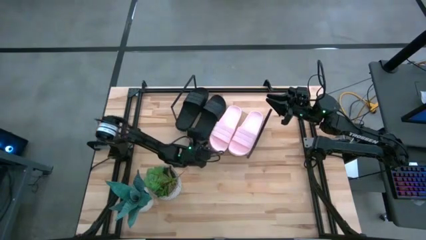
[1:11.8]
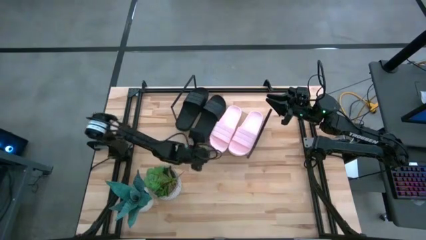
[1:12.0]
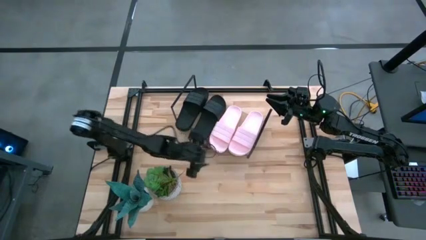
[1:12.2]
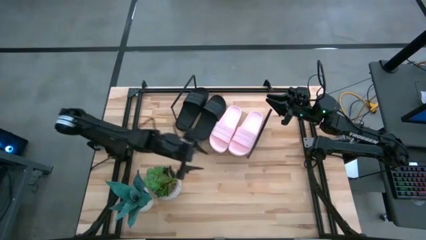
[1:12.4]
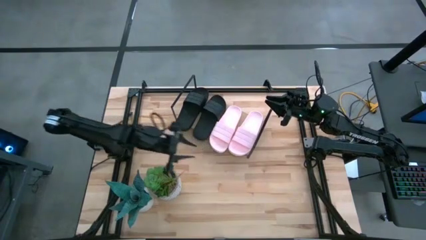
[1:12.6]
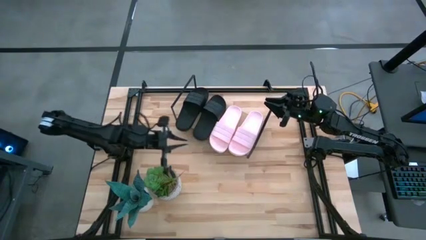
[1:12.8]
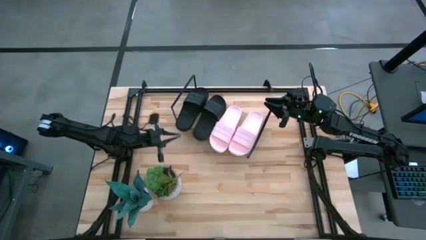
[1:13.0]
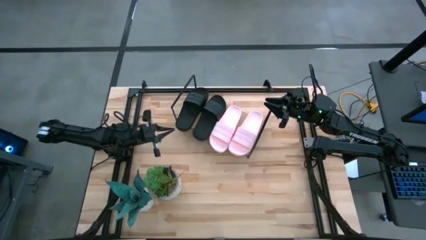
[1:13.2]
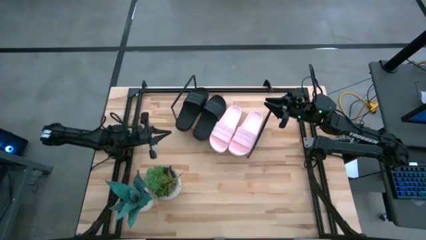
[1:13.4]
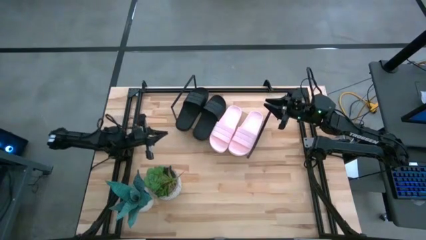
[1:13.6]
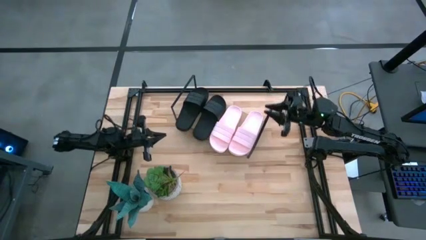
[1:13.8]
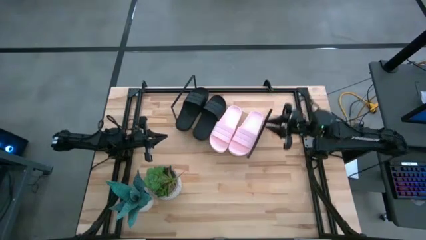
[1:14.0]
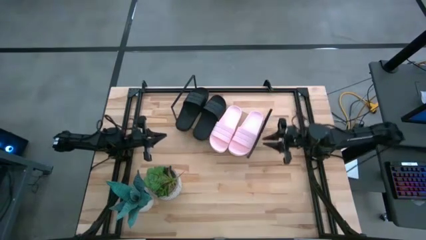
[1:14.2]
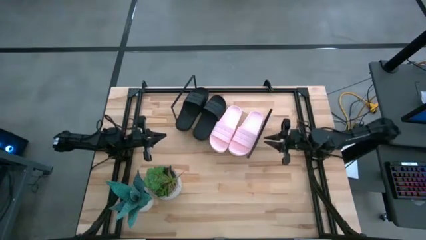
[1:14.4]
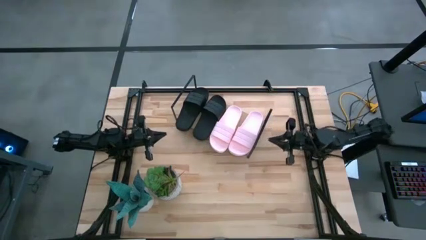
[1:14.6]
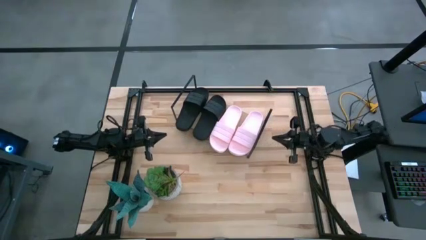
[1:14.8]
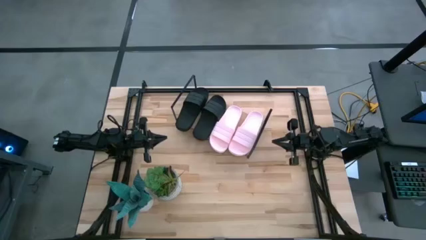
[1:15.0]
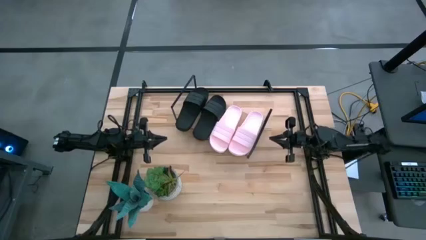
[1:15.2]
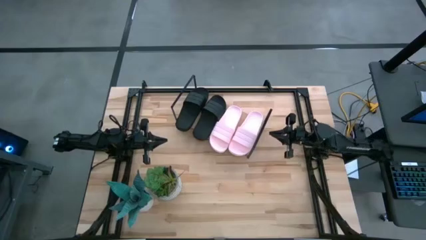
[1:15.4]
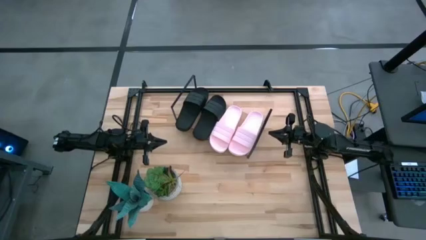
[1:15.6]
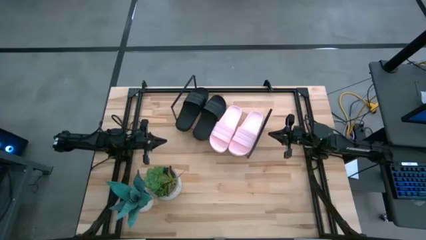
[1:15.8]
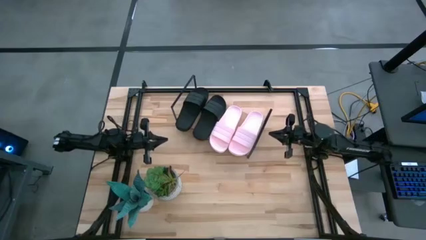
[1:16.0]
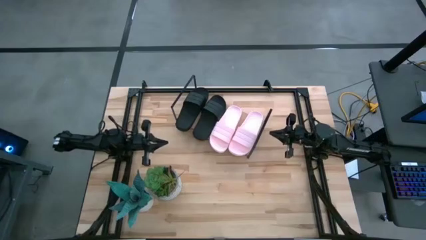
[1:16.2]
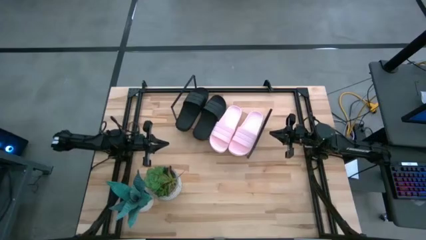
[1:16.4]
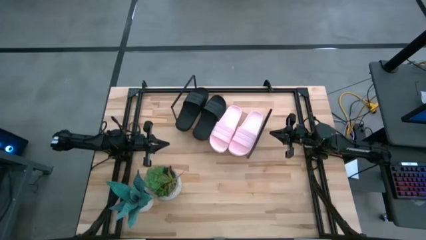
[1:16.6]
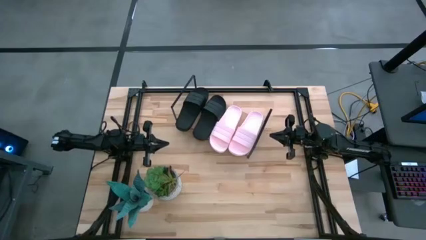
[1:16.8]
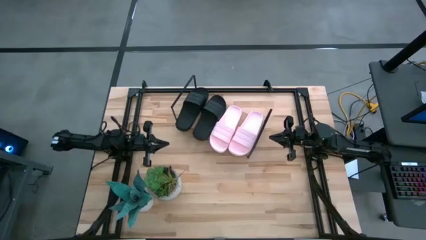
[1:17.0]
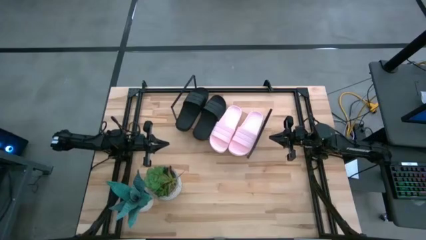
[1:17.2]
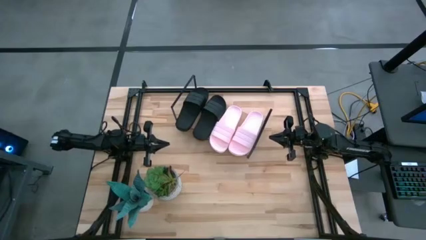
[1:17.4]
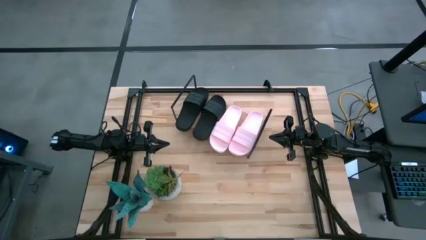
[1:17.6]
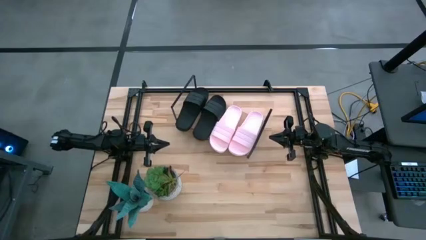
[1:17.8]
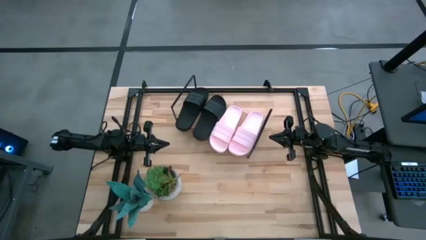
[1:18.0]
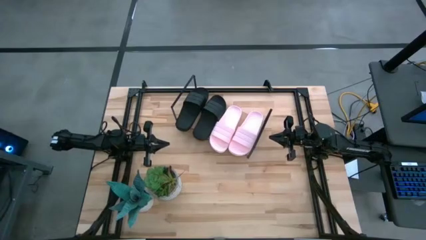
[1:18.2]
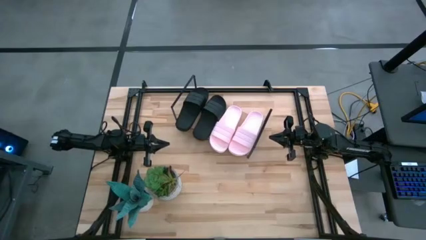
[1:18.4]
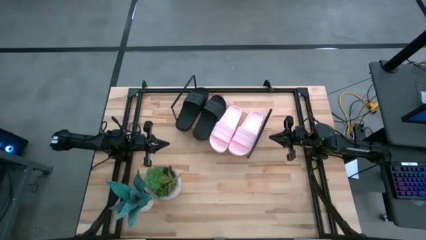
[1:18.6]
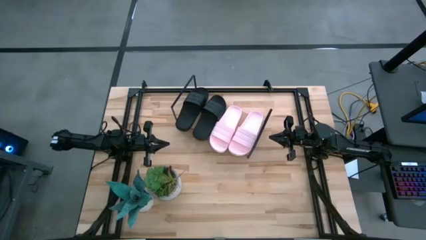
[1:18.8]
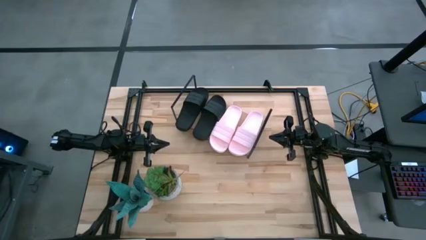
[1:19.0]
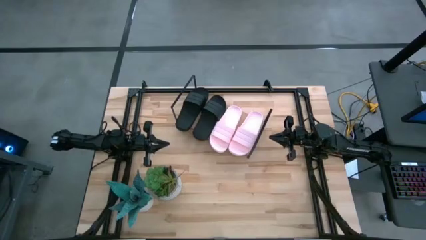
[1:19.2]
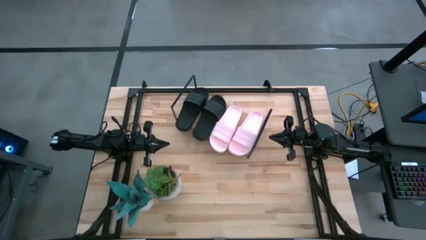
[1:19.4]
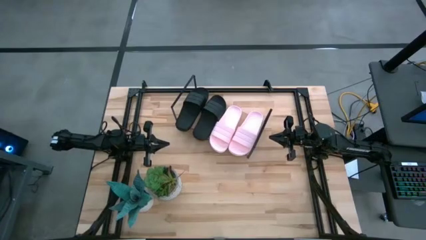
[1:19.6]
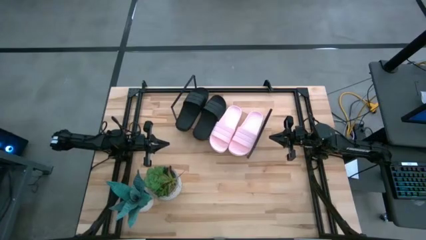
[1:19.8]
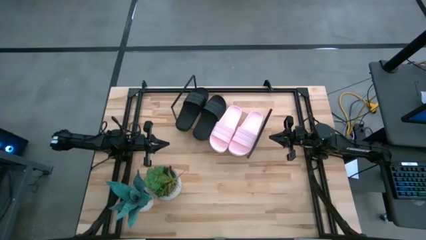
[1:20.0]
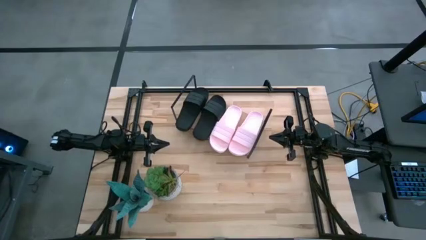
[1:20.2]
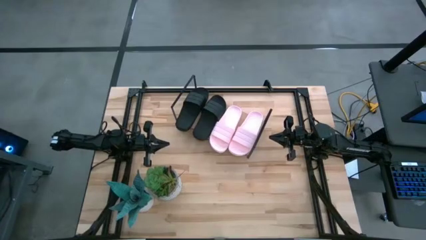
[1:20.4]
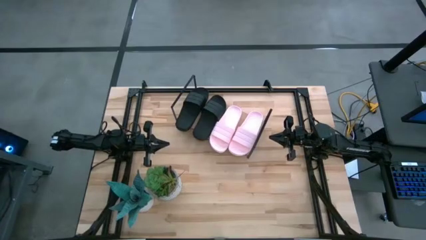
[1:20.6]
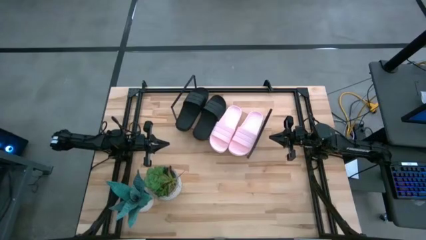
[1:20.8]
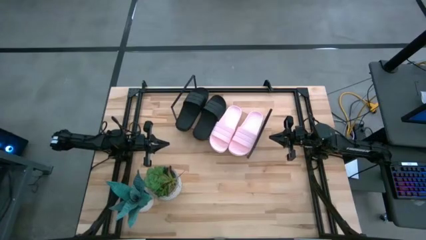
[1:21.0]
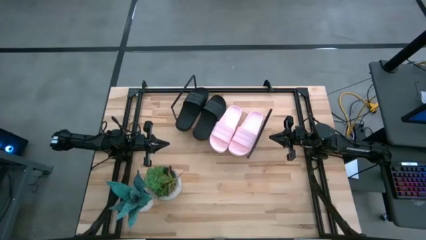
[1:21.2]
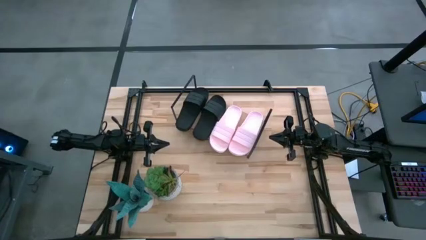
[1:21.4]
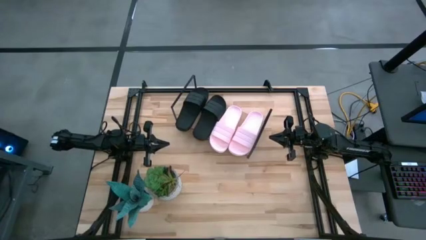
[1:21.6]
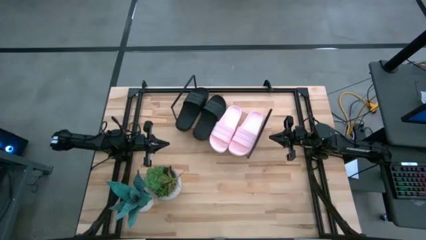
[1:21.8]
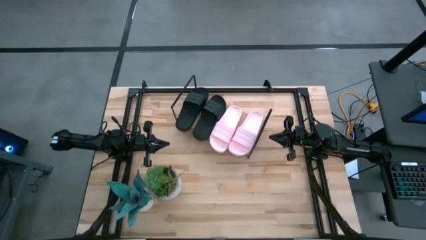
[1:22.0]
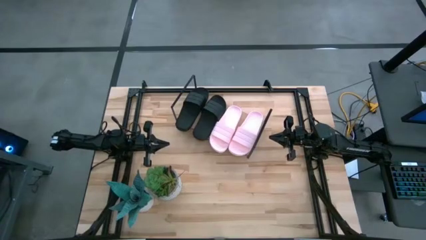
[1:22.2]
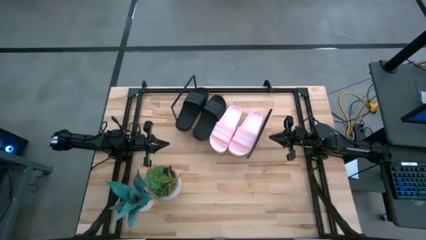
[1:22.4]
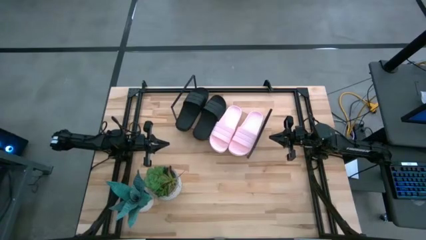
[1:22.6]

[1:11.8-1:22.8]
Task: Pick and place slides into the shelf
Return to Home Position

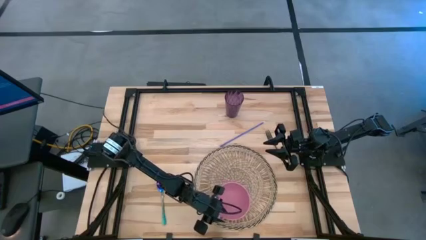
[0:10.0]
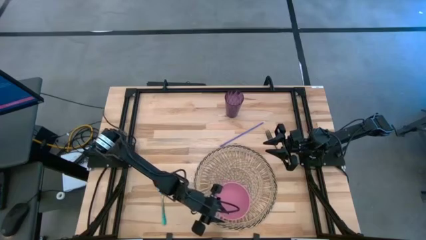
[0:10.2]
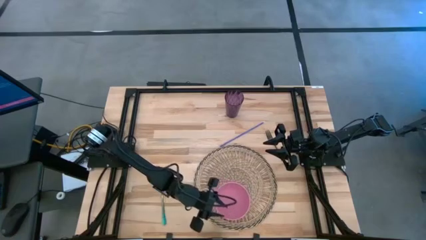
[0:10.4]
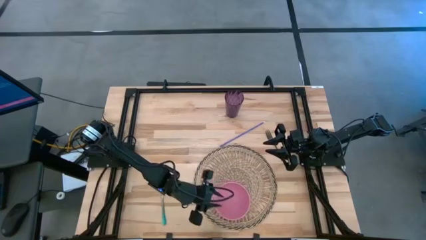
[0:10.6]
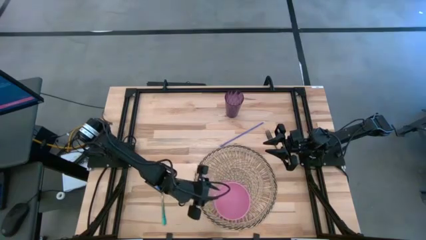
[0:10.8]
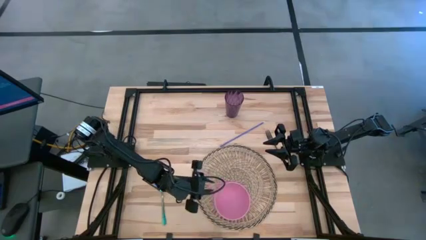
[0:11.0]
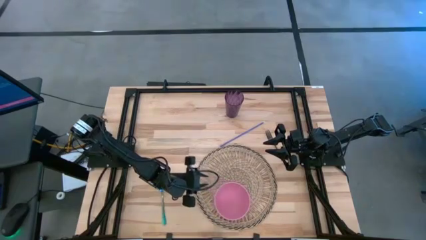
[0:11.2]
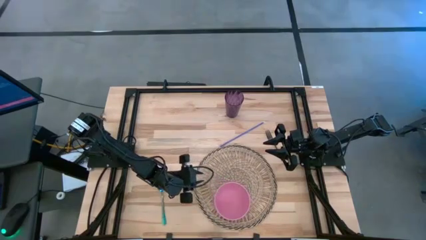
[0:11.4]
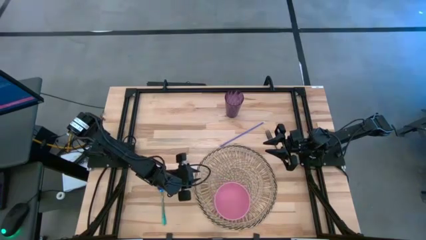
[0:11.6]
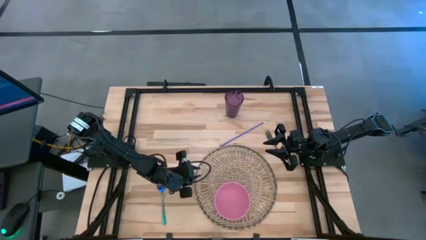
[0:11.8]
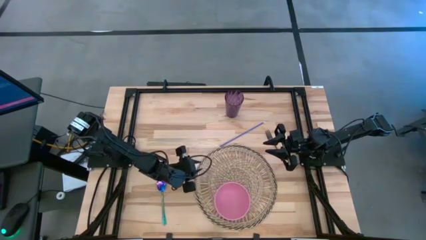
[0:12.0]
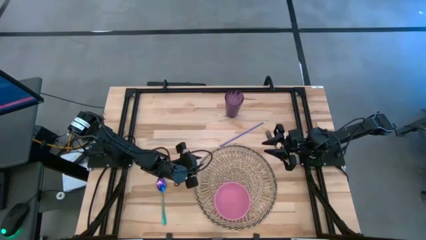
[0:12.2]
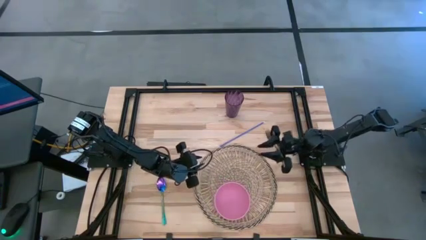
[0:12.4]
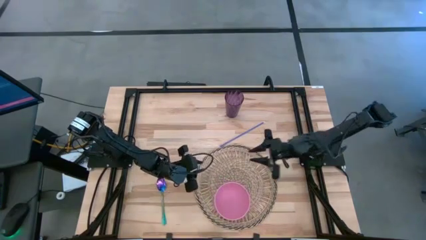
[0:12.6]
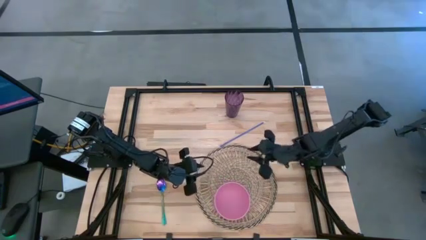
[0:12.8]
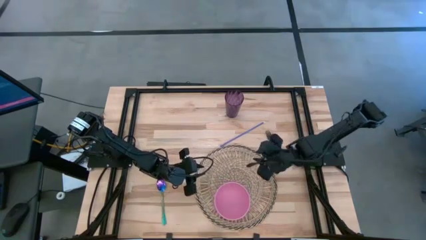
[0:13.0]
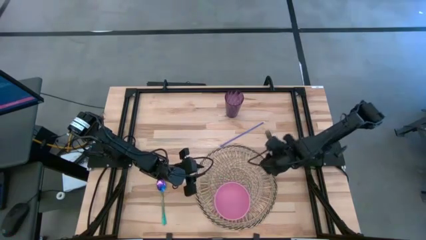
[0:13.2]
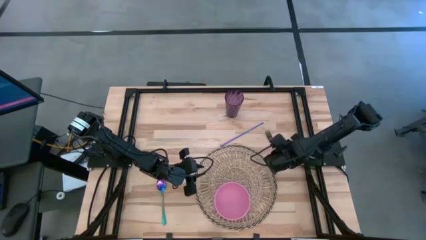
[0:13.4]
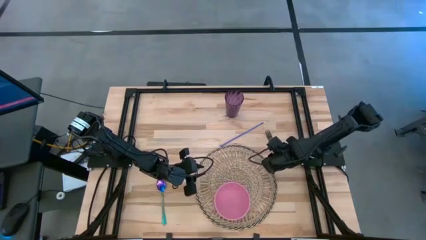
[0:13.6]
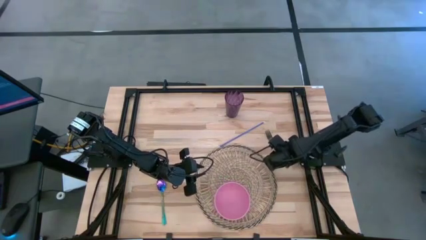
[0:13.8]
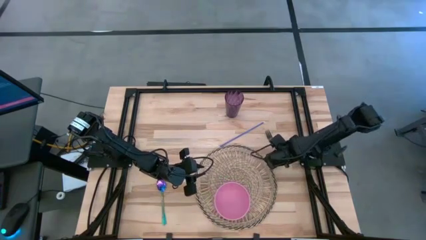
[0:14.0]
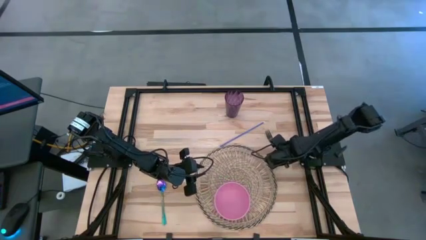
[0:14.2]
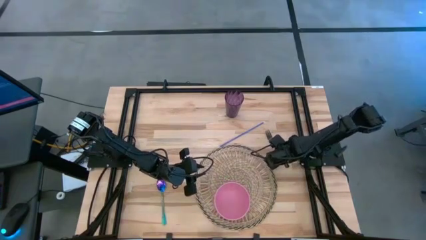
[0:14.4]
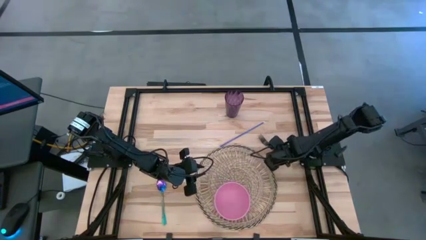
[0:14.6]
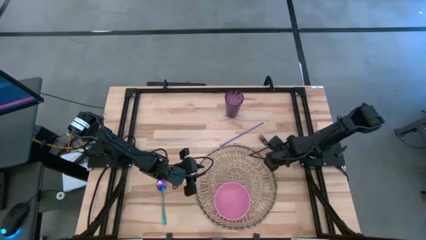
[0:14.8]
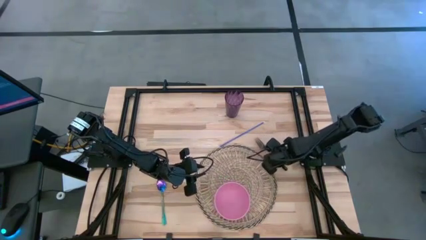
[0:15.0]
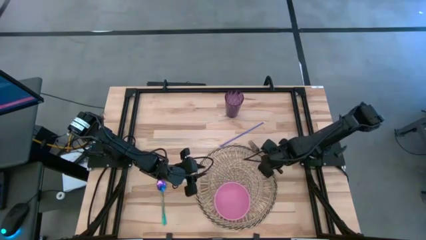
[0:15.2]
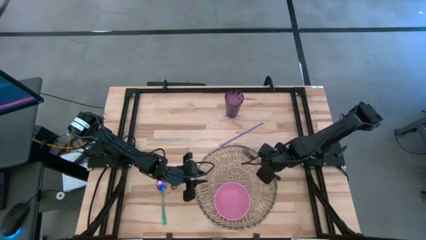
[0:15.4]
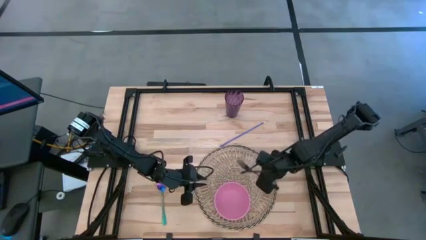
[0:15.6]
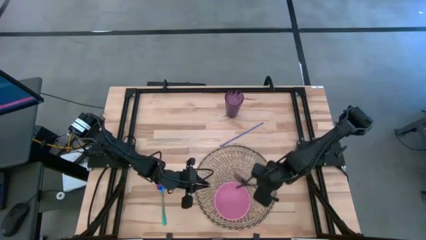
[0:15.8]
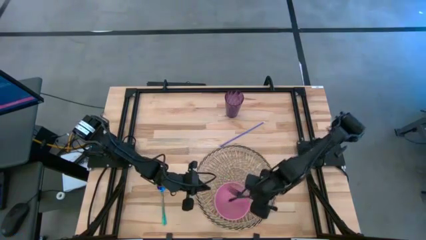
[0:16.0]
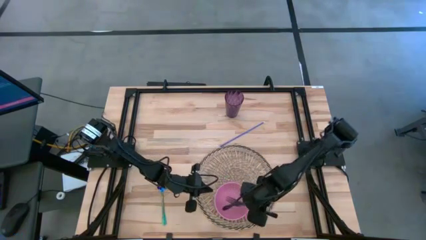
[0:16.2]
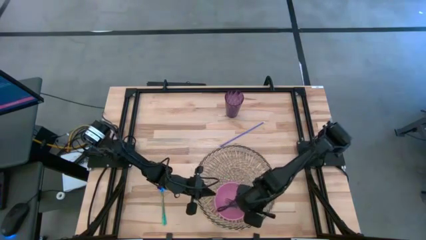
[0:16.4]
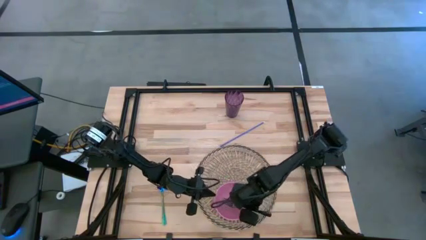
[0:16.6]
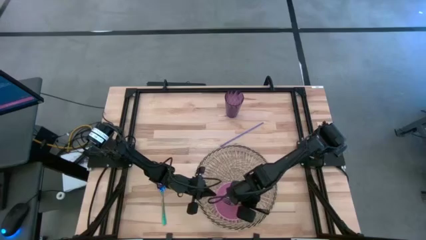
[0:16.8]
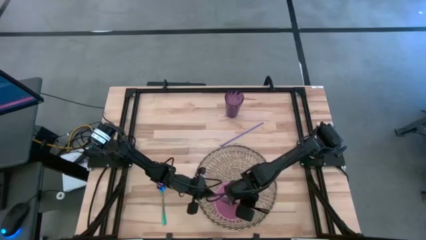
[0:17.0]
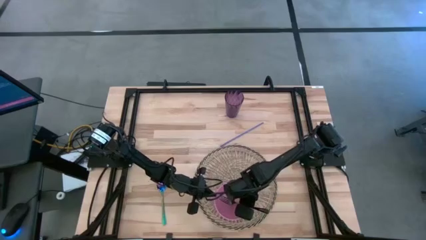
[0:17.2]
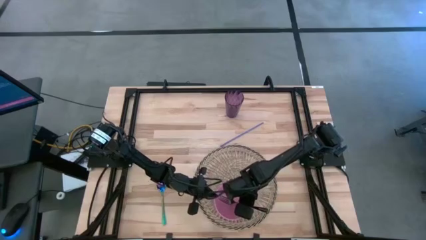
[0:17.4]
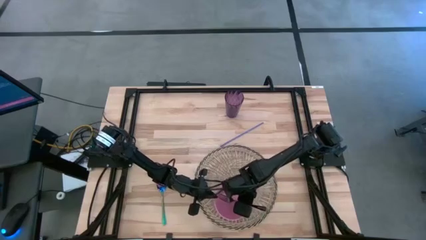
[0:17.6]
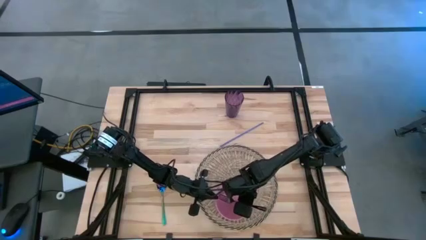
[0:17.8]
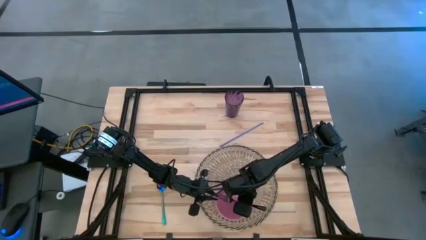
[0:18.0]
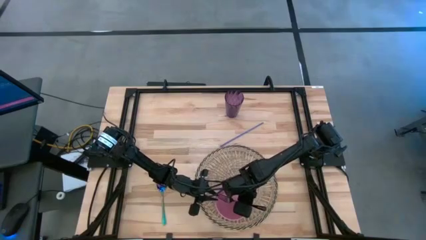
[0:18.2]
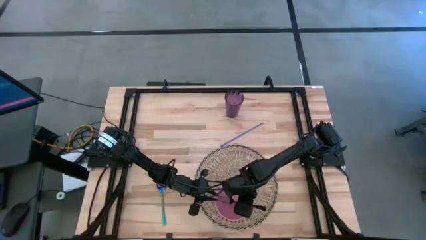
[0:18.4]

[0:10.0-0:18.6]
Task: Pick & Place Utensil
Put the black fork into the pink bowl on the woven mat
